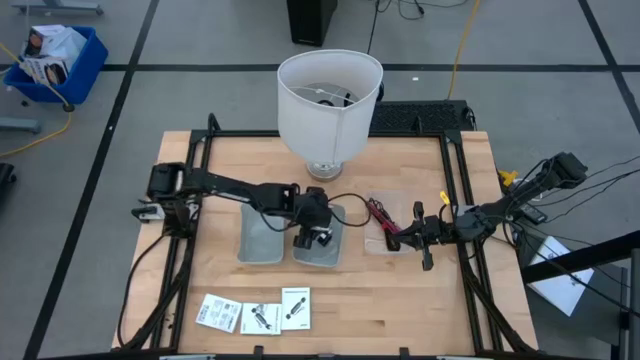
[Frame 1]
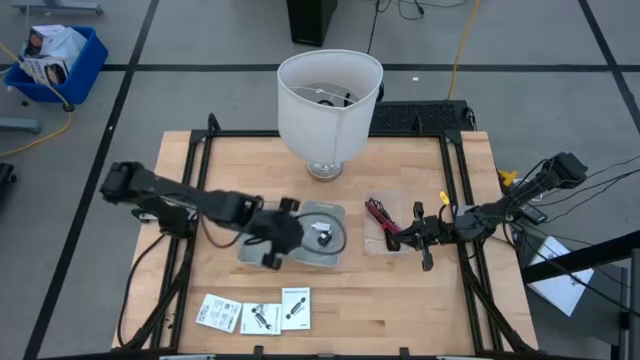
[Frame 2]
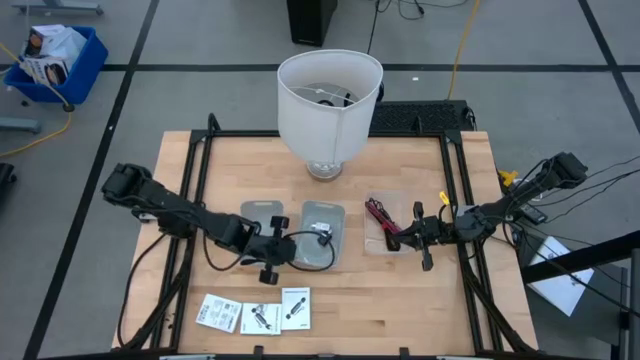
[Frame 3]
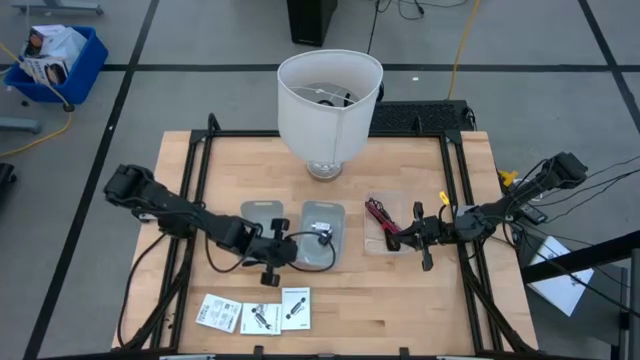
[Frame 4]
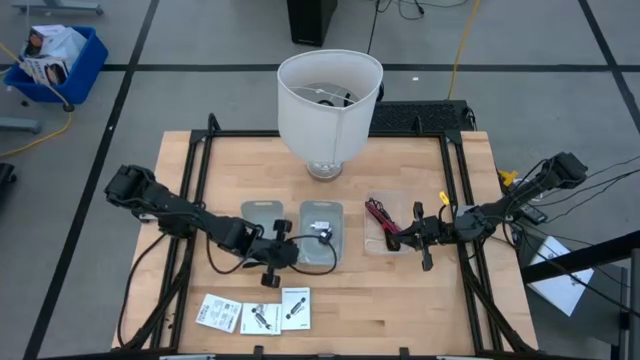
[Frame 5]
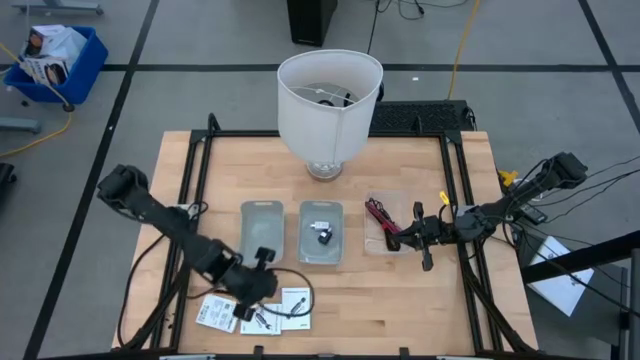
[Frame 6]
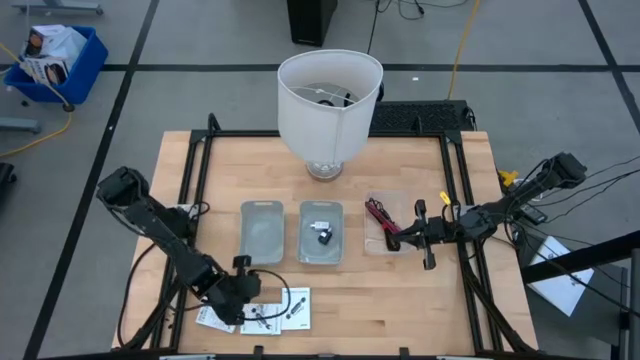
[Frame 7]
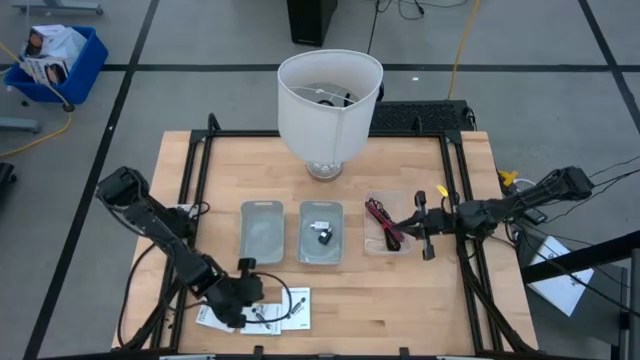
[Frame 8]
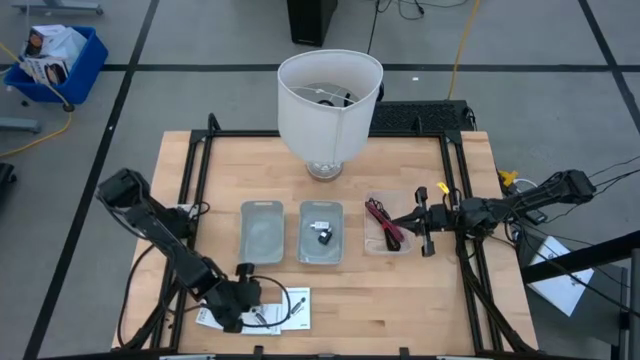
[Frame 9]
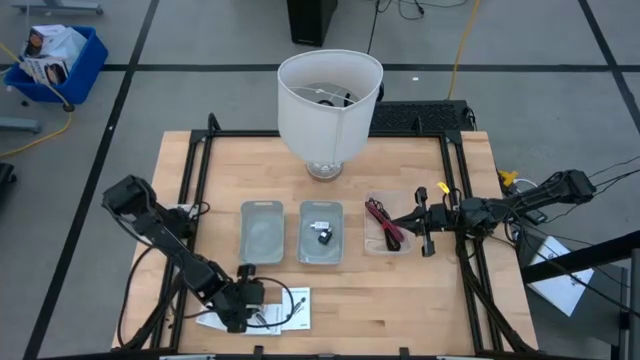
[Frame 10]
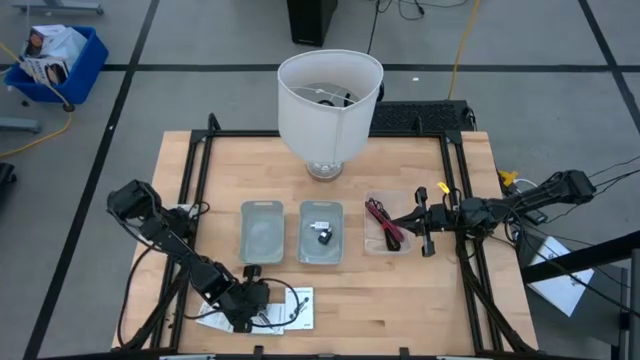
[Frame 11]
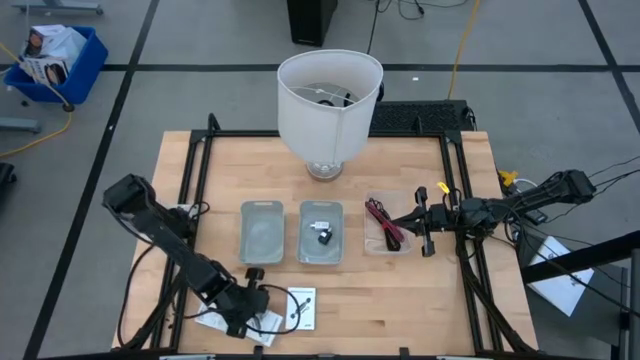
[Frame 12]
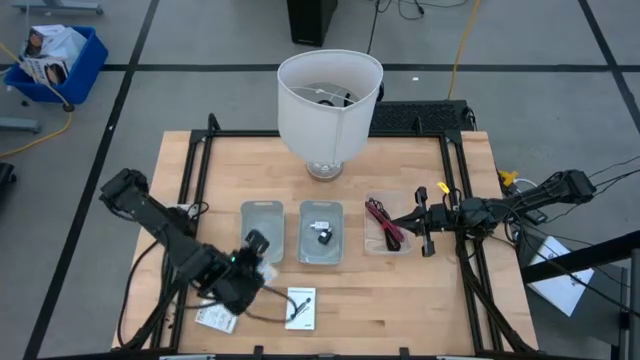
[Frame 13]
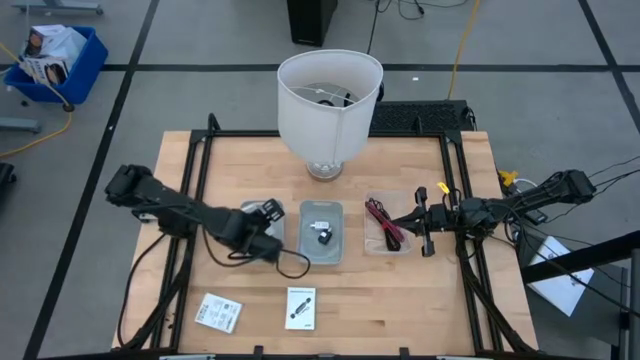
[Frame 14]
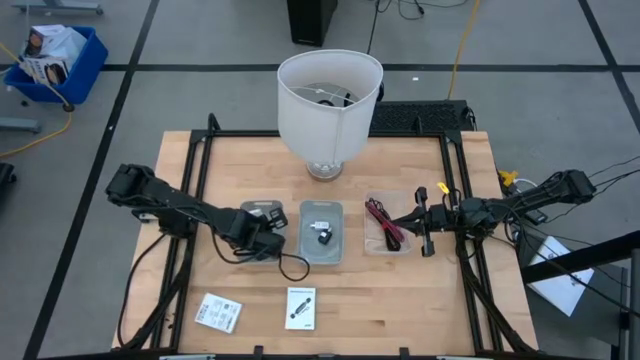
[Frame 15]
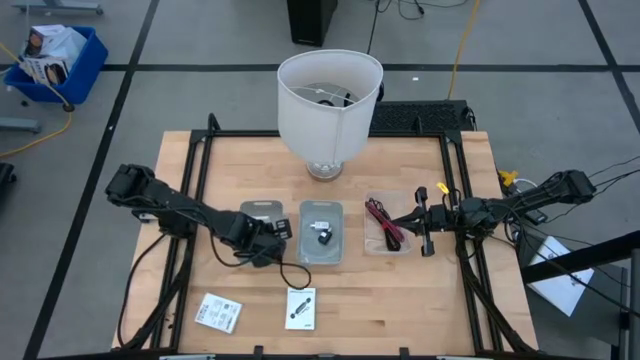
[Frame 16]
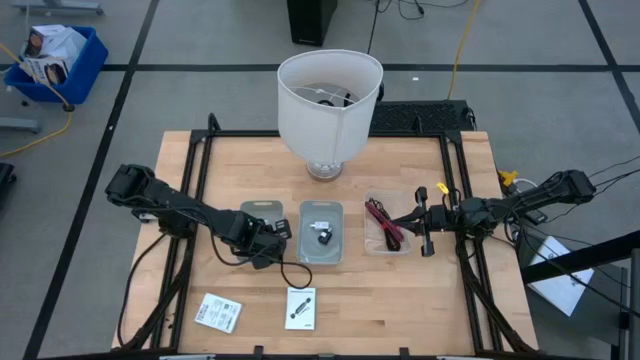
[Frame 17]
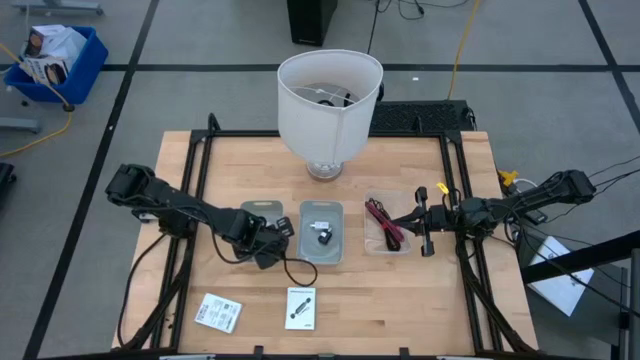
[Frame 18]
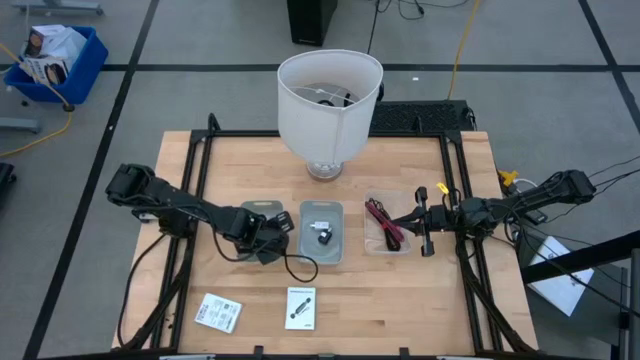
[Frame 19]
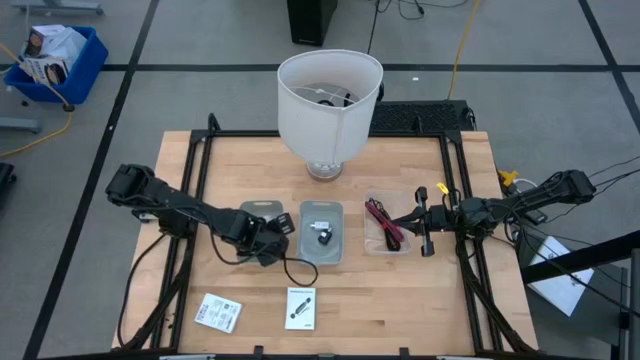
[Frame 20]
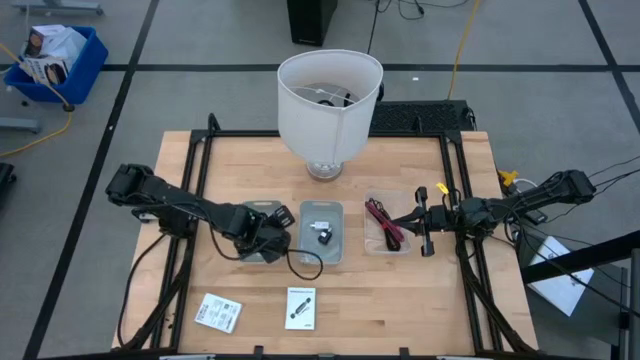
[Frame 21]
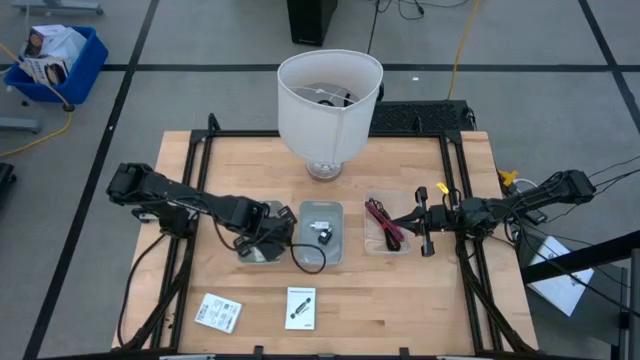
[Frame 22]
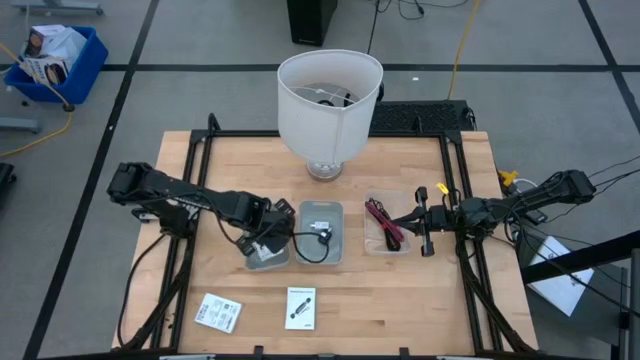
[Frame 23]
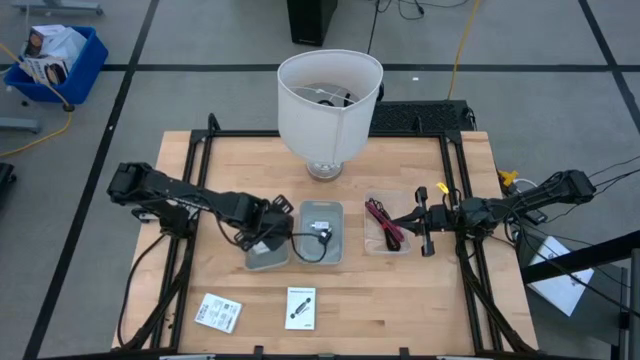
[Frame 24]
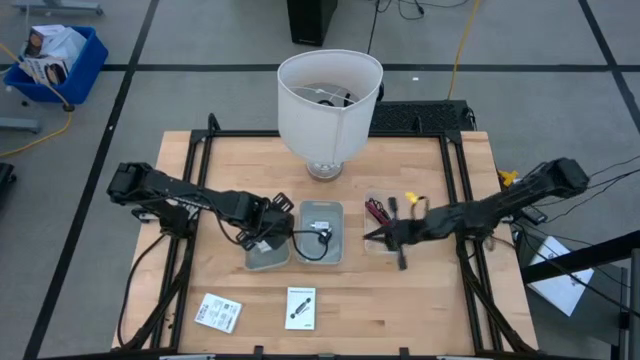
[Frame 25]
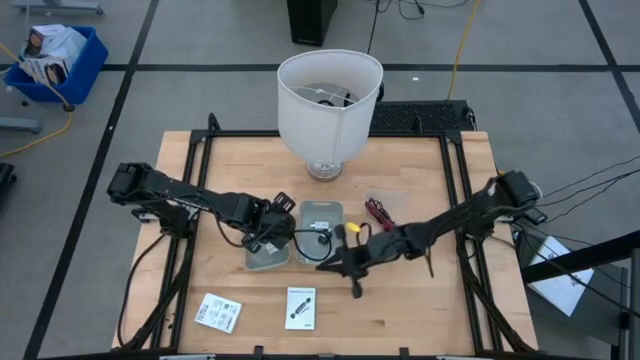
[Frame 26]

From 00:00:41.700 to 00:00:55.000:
Task: Pick and place items into bin
Put the middle card reader box into the left gray bin

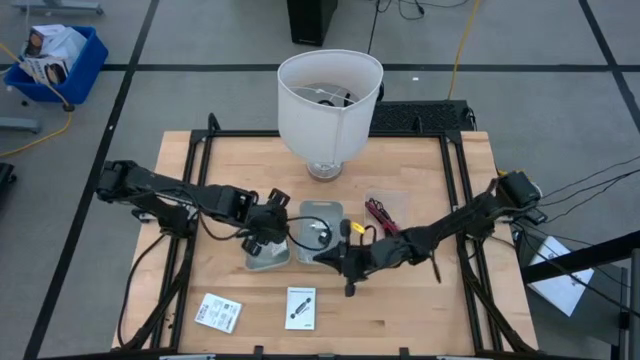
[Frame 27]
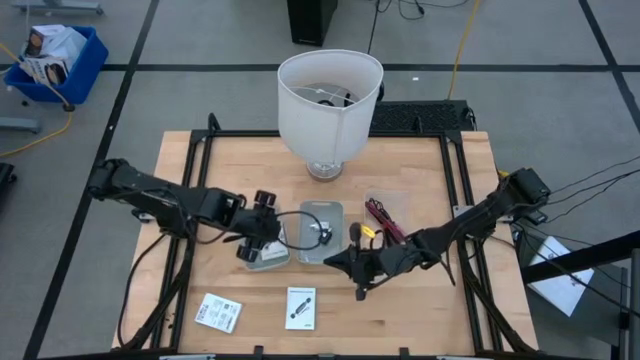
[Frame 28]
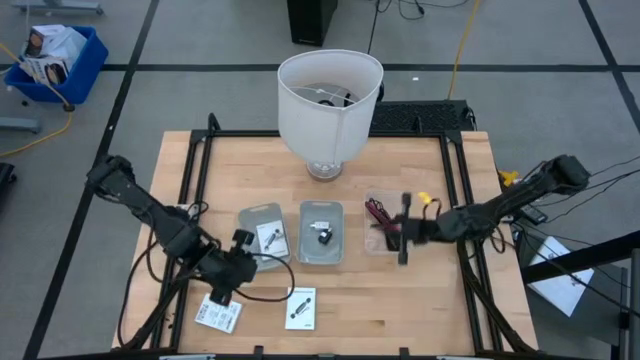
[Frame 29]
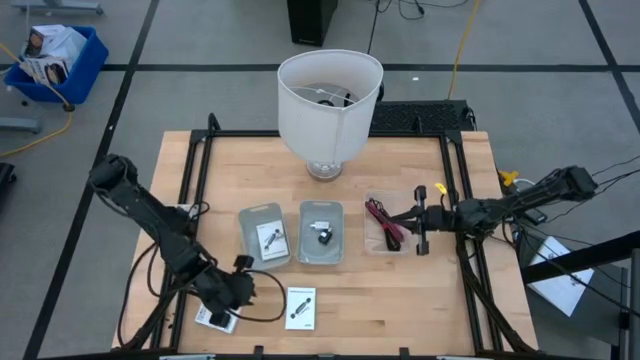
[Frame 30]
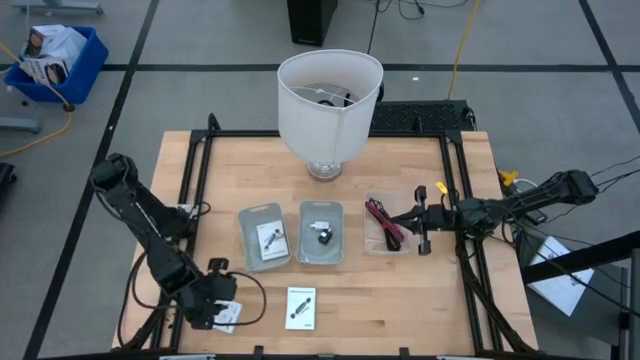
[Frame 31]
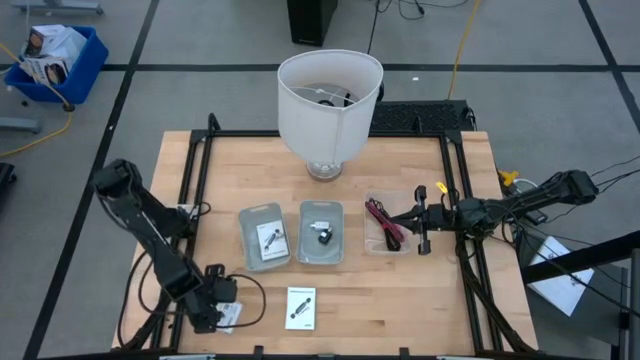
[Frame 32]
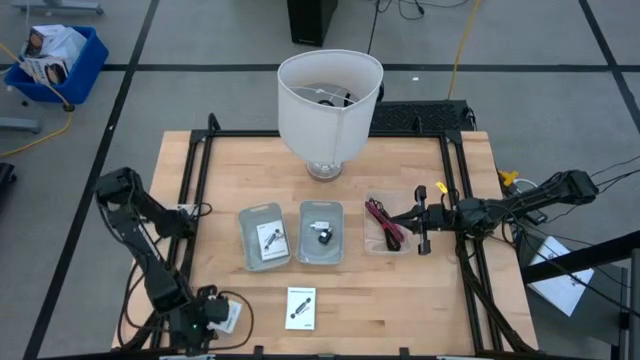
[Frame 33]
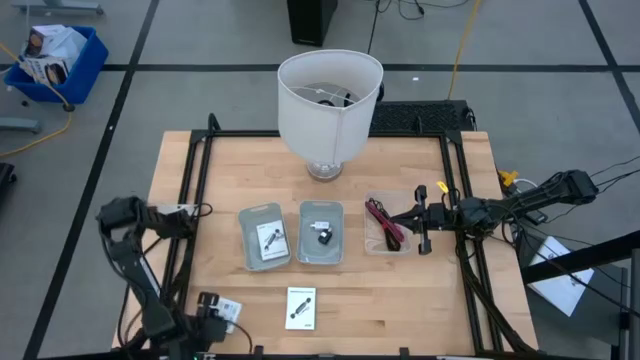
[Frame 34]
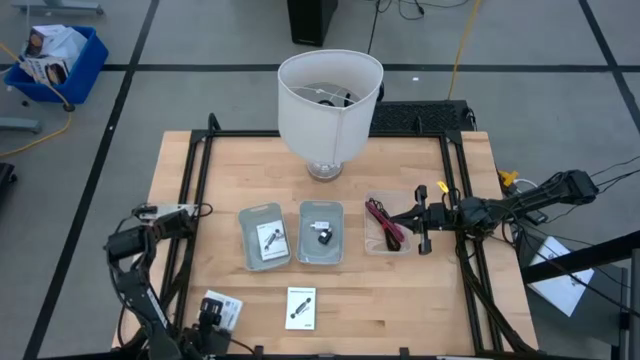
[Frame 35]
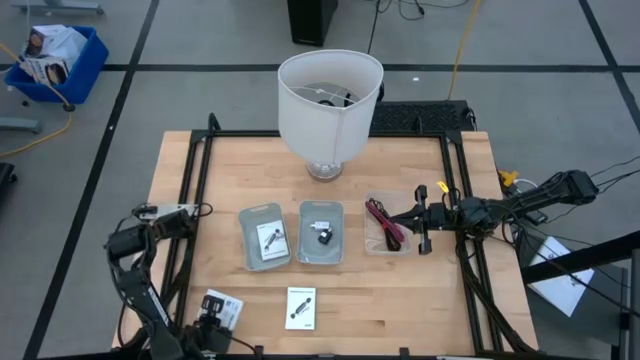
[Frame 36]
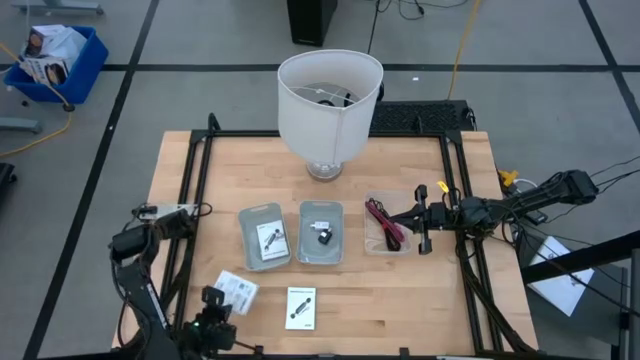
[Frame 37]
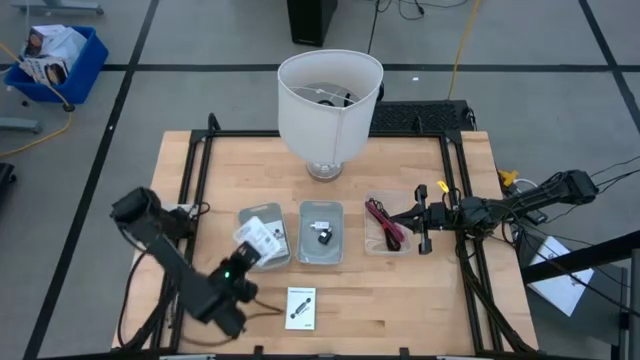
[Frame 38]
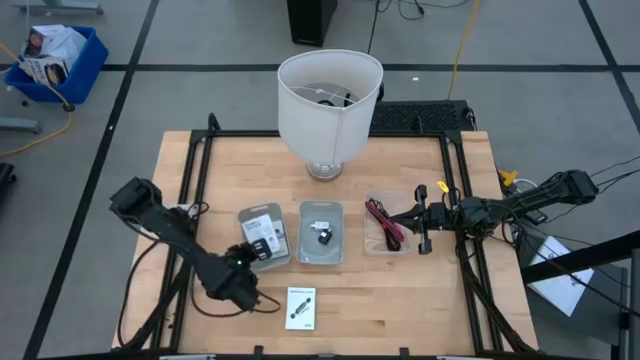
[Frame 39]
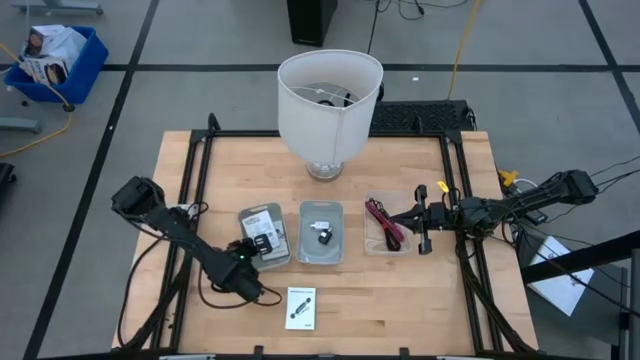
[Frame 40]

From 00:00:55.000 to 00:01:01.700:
Put the left card reader box into the left gray bin

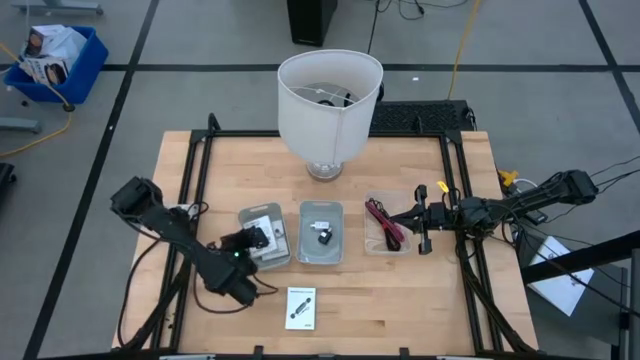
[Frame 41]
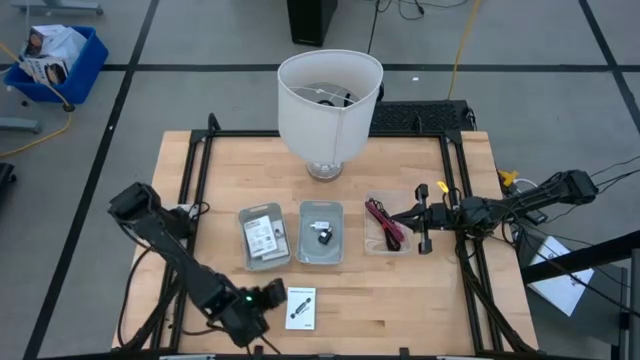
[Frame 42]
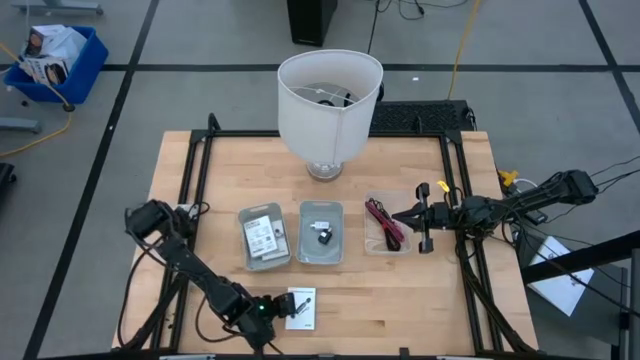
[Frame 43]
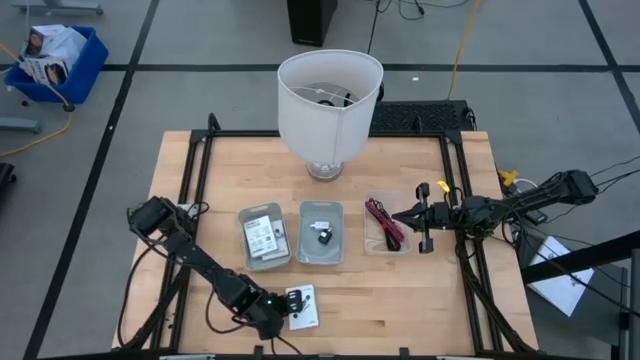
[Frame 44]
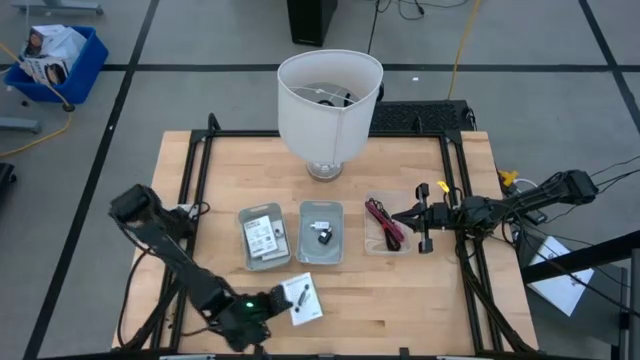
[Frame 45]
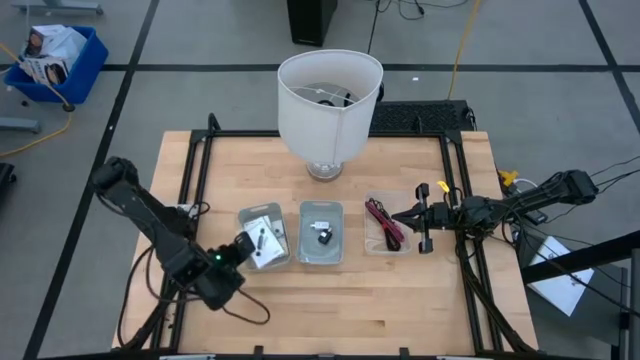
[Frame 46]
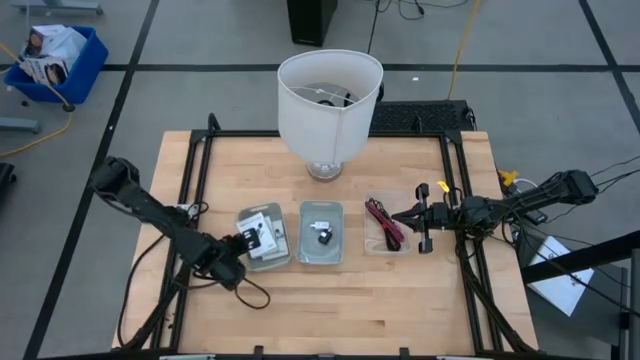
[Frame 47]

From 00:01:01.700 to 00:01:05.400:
Put the card reader box into the left gray bin
